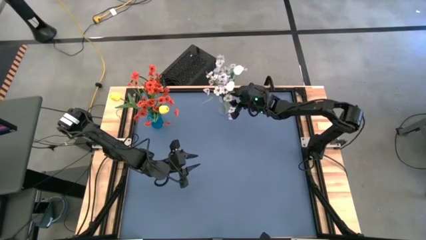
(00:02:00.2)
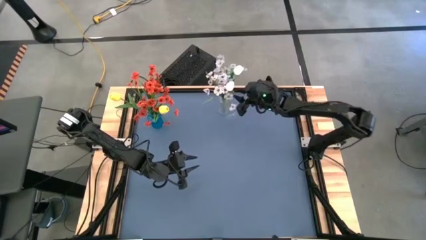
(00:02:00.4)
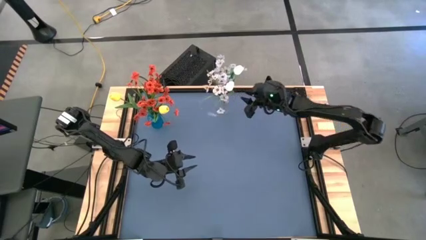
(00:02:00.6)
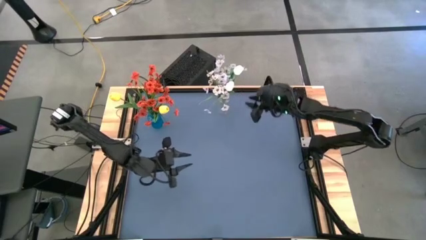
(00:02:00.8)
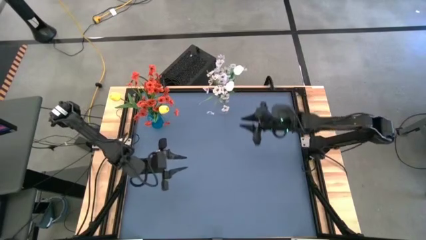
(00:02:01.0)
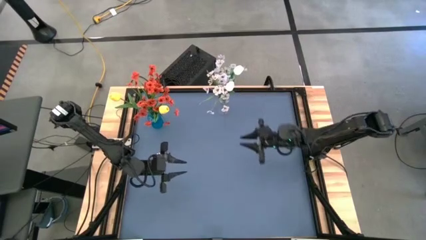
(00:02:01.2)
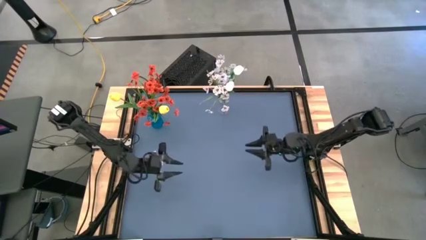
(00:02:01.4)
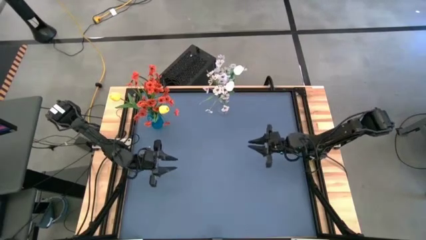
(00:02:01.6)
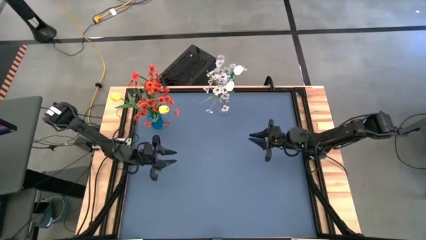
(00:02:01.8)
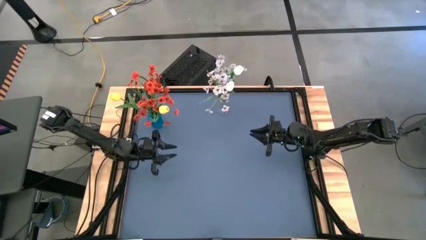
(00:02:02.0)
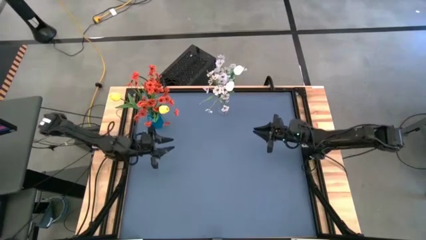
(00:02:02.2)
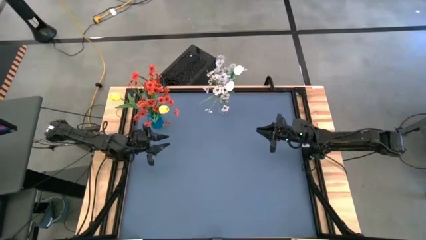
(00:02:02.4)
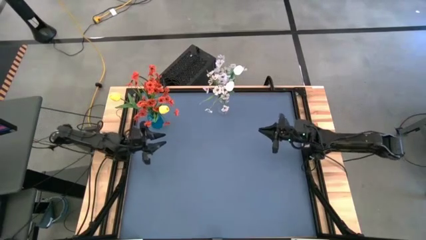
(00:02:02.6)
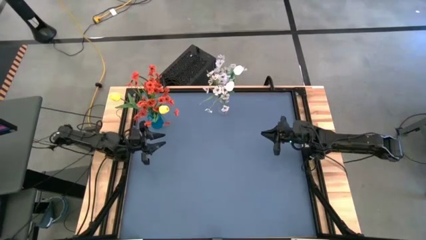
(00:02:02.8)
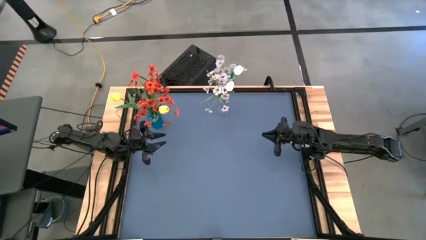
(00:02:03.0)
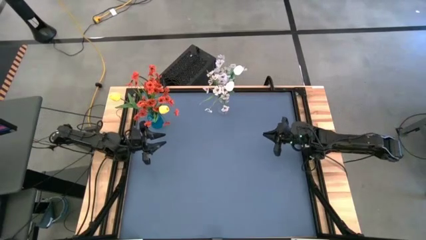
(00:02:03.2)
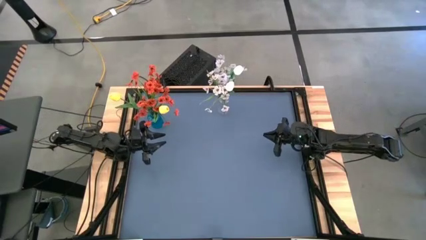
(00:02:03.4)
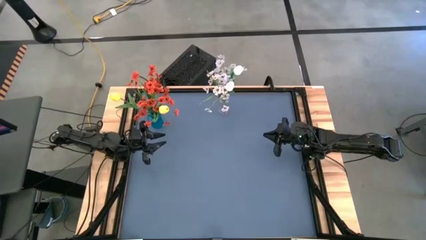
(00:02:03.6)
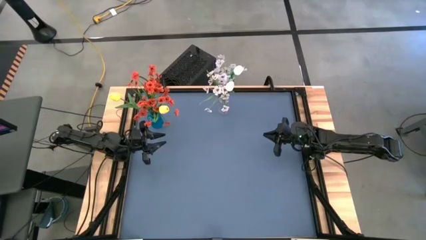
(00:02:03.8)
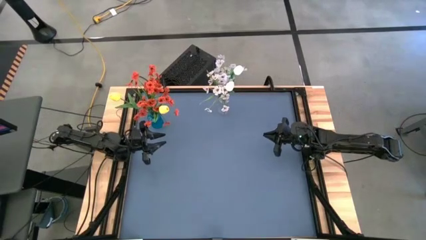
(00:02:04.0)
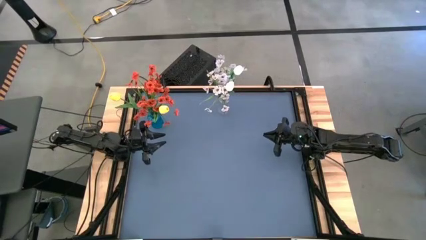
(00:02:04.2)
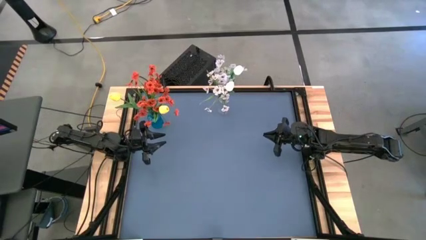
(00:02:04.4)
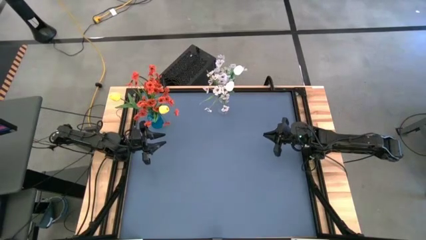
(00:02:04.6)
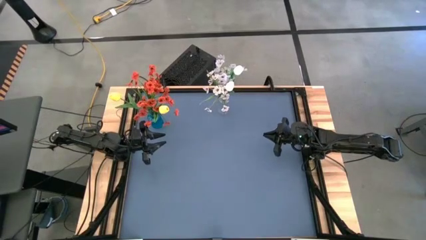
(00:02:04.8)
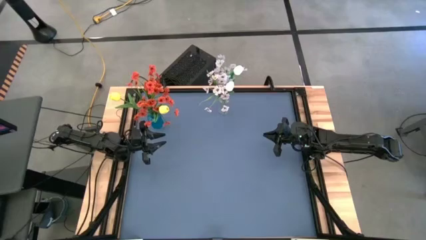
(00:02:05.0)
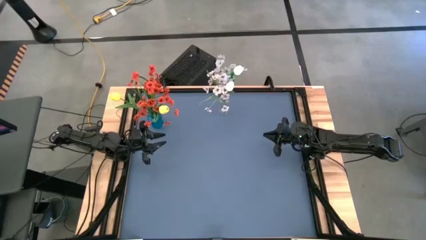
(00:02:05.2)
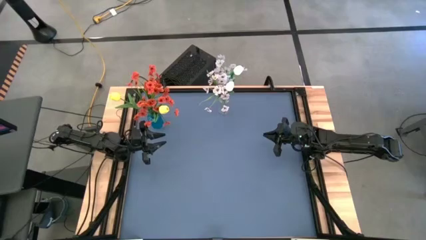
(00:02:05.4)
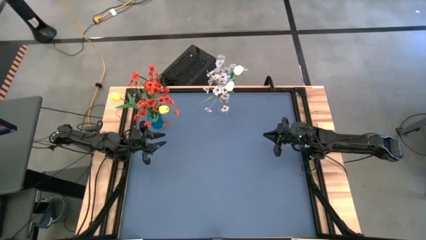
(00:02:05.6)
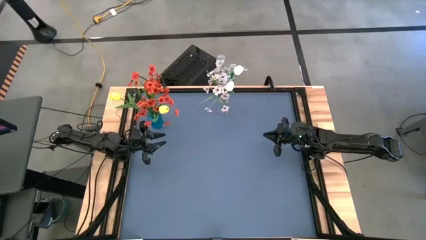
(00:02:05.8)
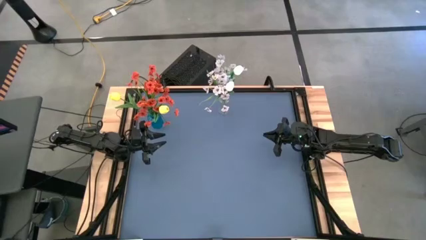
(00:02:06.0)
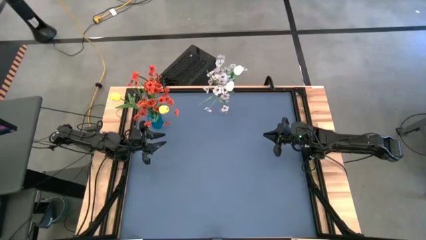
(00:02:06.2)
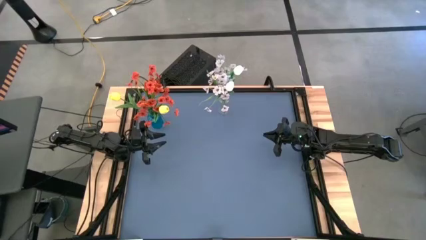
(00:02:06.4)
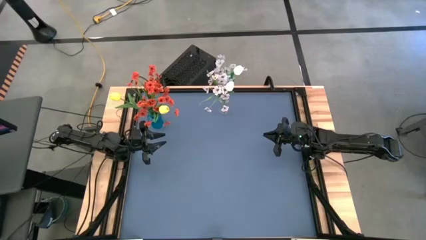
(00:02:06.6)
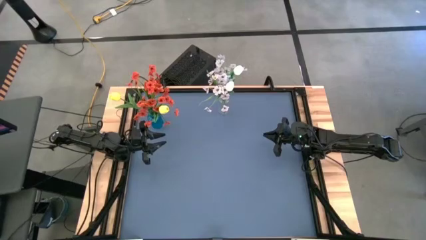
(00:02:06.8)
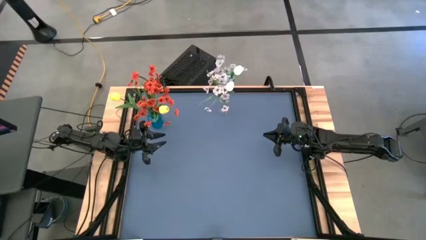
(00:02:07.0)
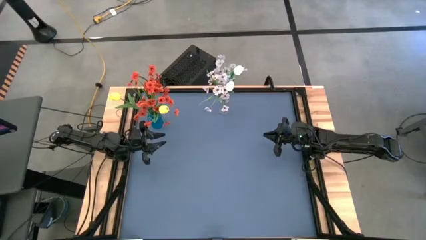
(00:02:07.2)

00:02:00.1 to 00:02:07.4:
Task: Sort flowers into vase by color
Return to Home Position

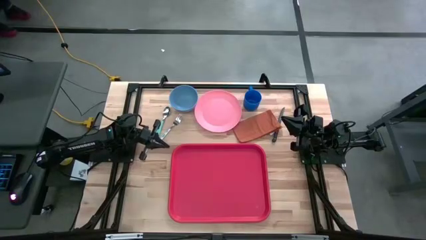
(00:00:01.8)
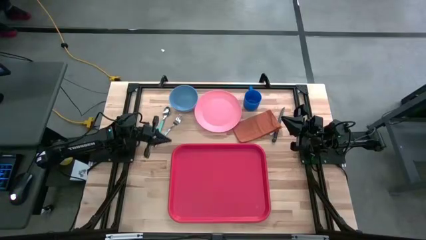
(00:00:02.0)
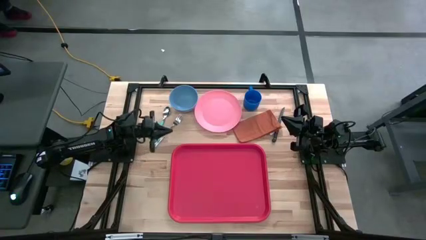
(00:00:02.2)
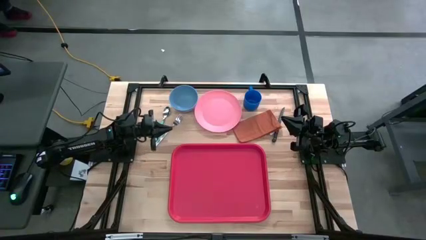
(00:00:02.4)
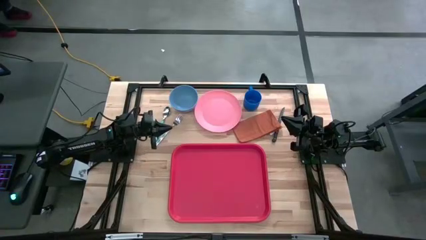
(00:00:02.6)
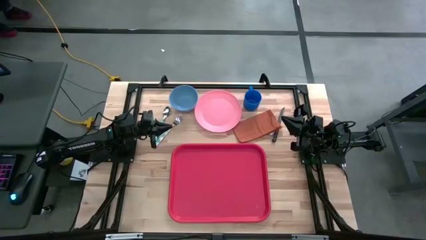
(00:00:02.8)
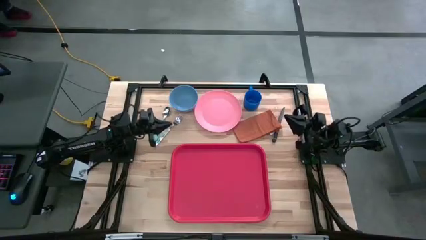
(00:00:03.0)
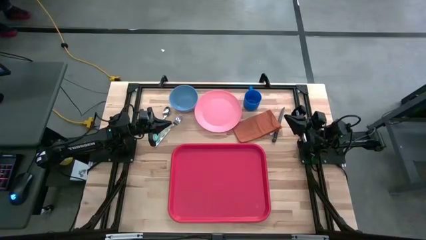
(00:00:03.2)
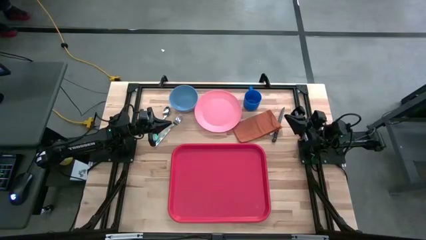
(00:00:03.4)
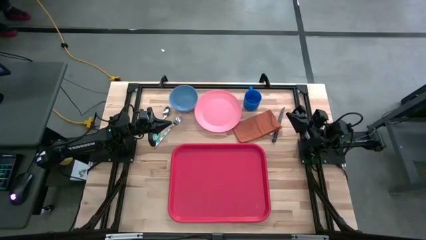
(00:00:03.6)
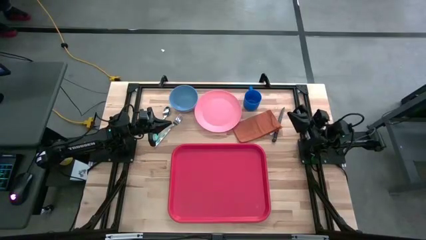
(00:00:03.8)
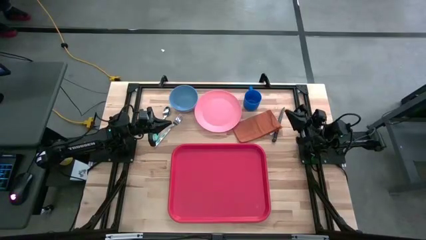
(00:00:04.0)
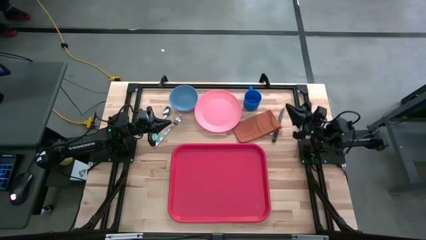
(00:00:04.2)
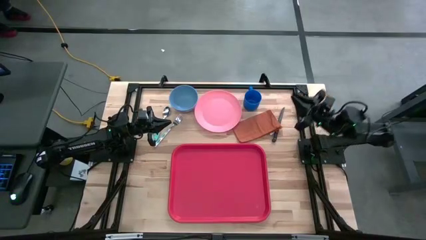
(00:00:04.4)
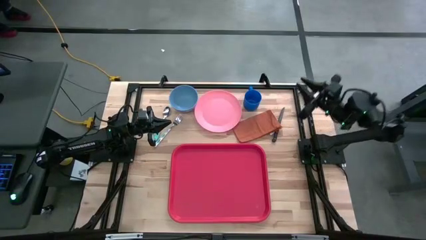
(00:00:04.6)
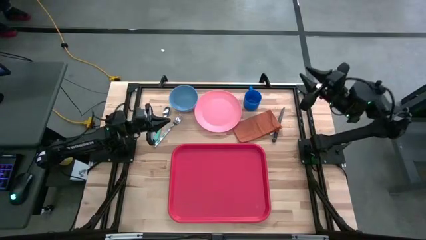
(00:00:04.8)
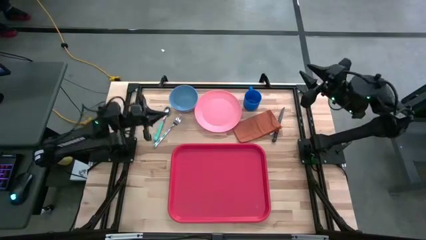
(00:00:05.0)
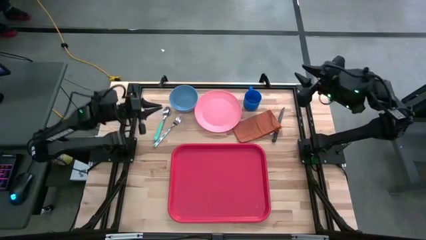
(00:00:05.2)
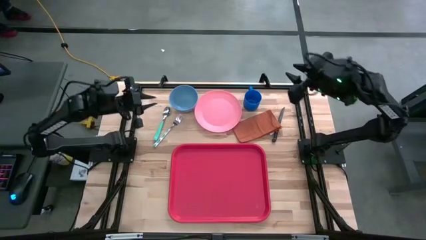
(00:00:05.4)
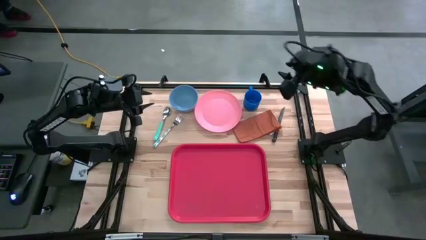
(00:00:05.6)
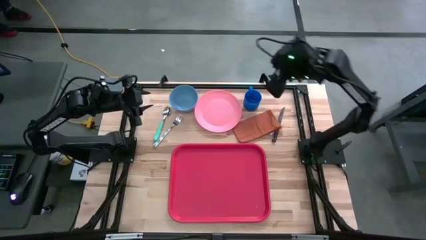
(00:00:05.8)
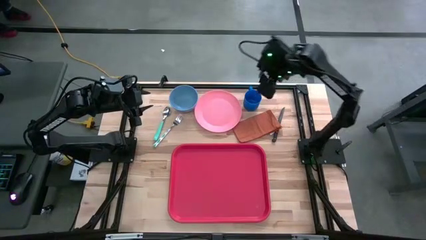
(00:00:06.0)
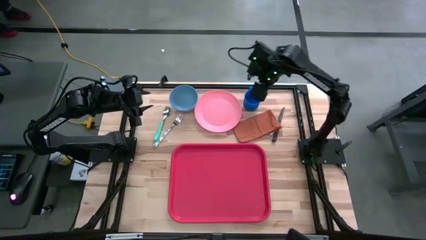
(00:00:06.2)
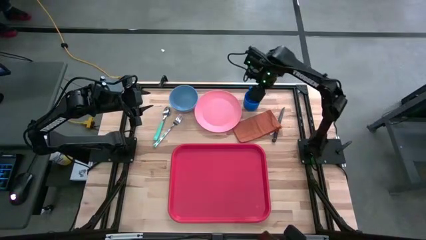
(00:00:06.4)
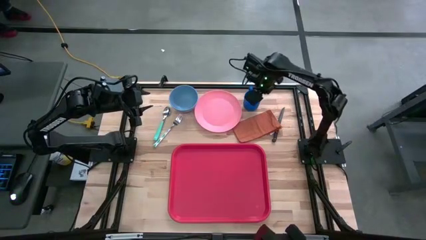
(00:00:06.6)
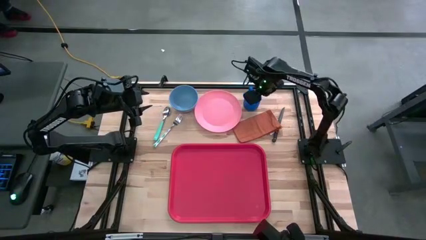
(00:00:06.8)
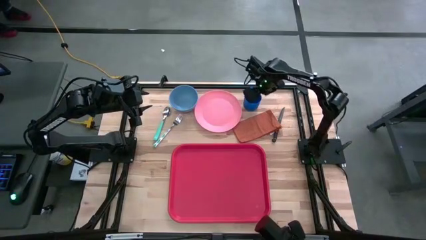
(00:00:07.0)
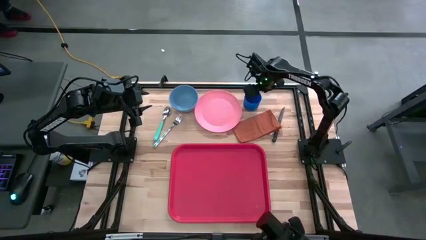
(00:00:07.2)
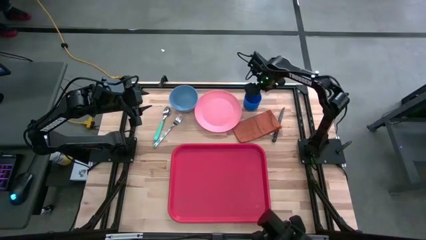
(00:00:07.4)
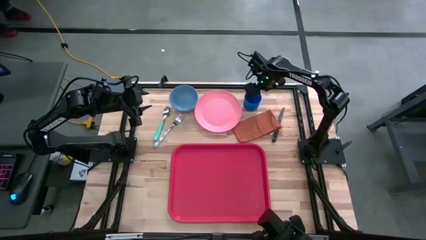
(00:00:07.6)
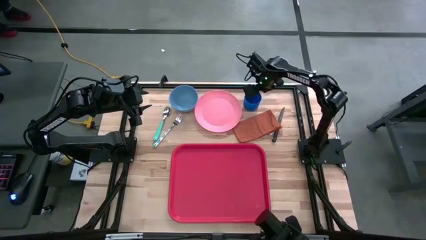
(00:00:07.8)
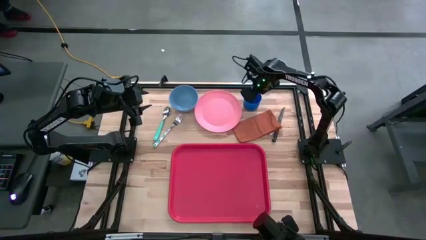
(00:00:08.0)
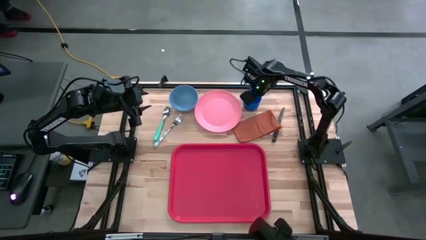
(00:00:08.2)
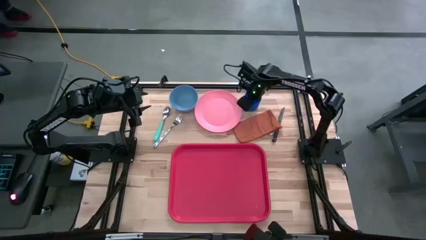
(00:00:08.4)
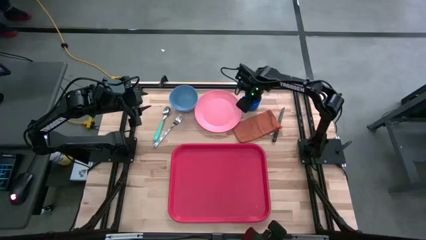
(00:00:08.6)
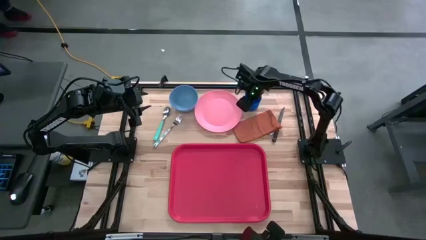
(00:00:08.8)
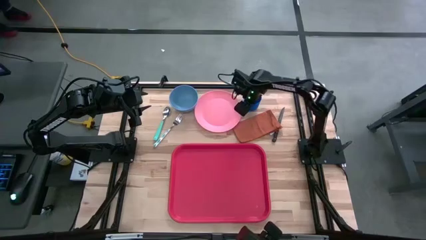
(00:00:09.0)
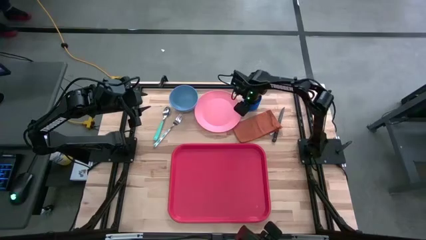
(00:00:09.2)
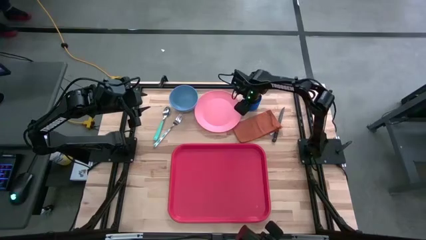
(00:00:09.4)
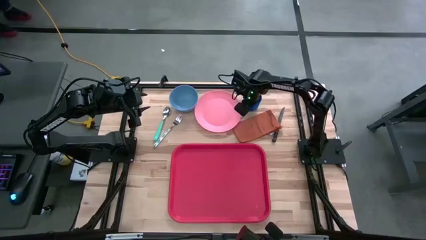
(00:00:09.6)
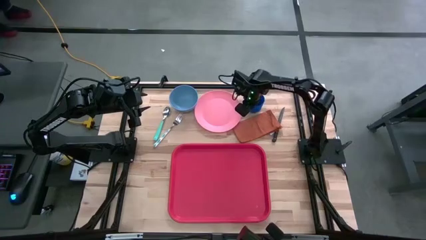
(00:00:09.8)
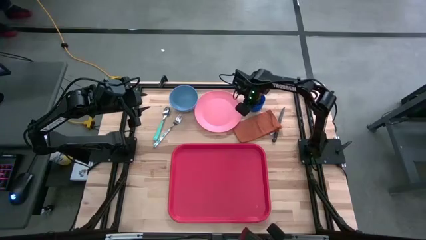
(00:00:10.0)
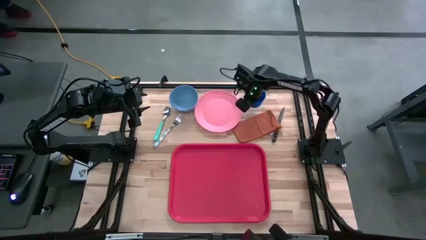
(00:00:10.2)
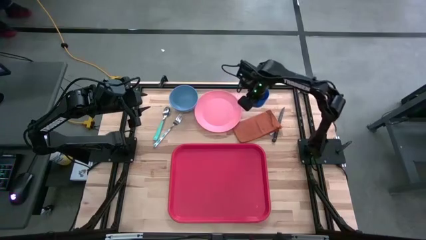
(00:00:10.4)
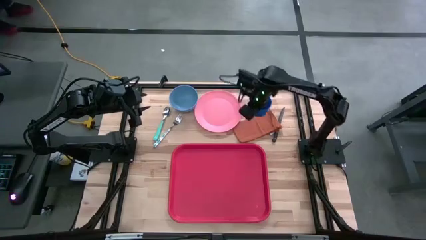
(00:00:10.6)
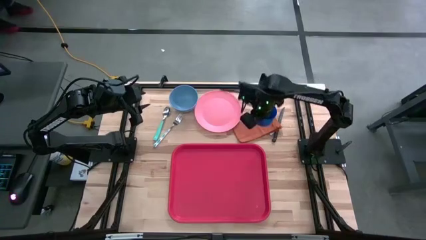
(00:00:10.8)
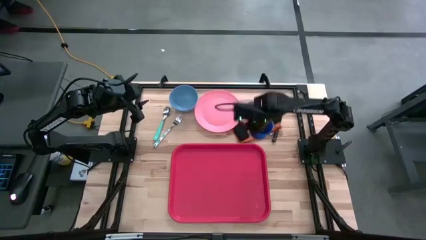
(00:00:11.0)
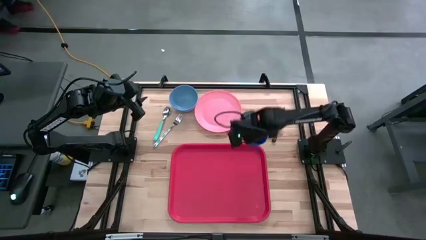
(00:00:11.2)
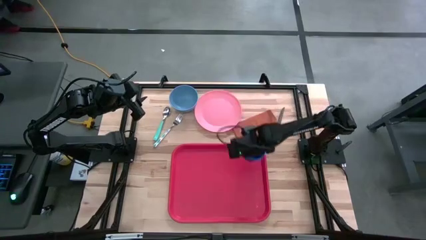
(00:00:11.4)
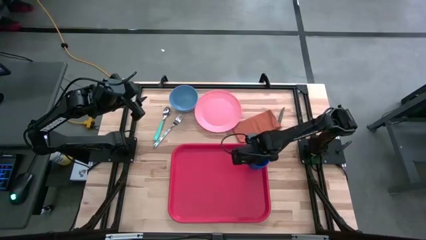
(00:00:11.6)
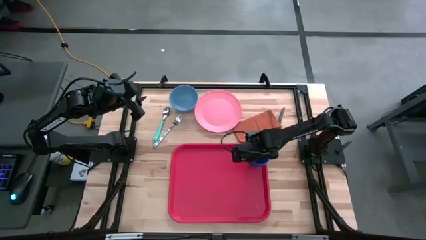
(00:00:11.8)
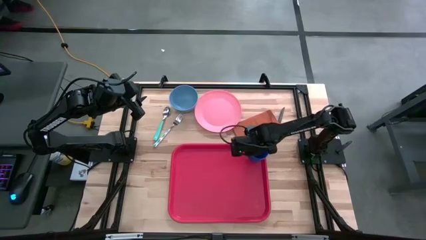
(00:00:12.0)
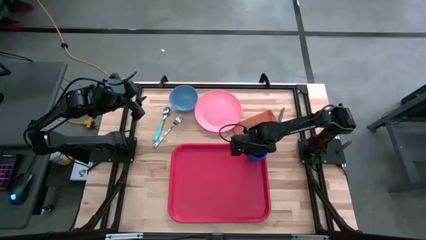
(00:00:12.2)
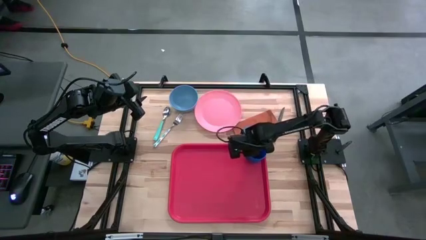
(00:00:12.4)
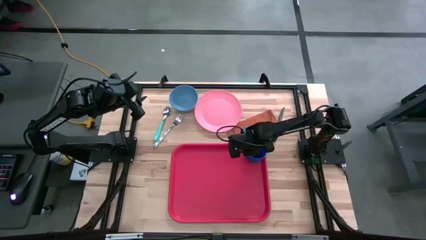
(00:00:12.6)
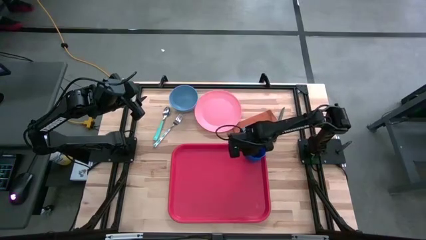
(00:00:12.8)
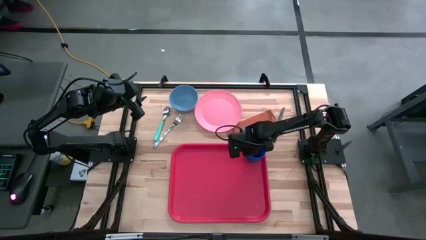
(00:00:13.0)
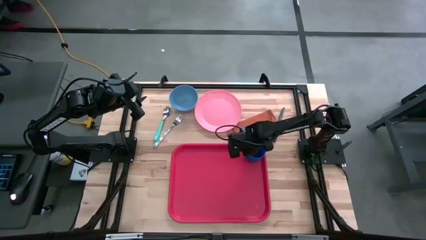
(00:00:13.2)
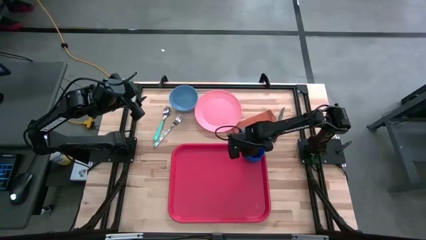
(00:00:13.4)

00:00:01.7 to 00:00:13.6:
Task: Set up tray
Put the blue mug on the top right of the red tray
